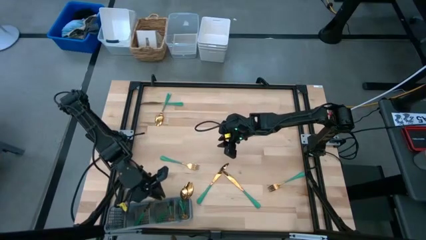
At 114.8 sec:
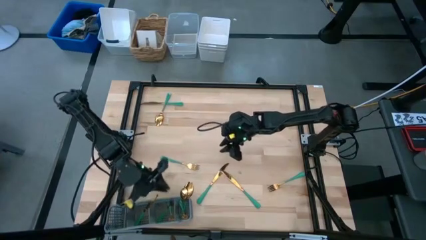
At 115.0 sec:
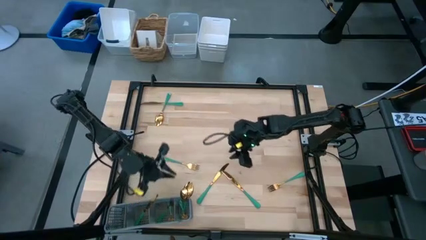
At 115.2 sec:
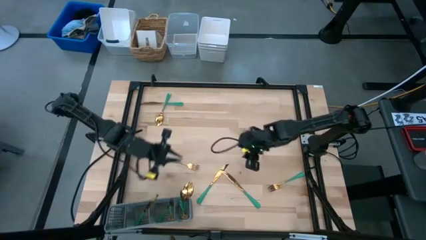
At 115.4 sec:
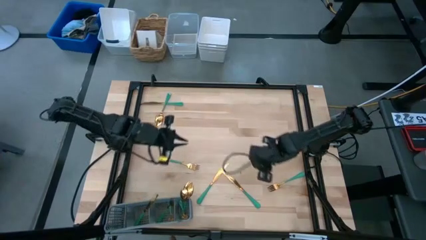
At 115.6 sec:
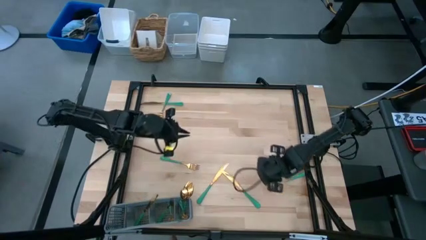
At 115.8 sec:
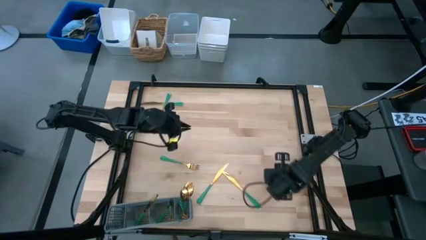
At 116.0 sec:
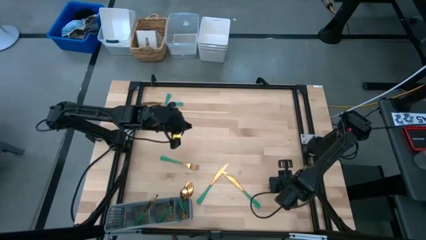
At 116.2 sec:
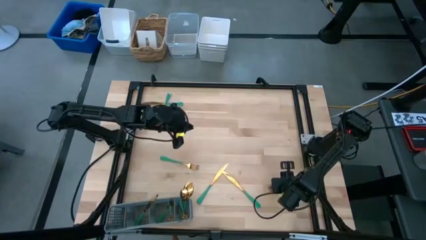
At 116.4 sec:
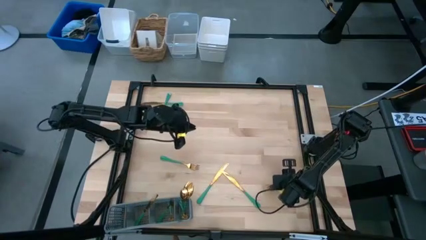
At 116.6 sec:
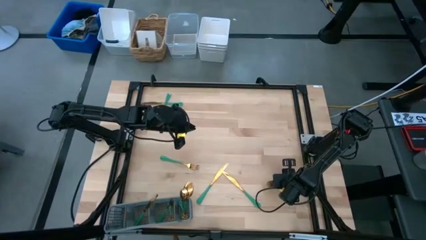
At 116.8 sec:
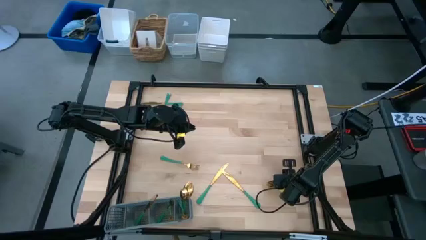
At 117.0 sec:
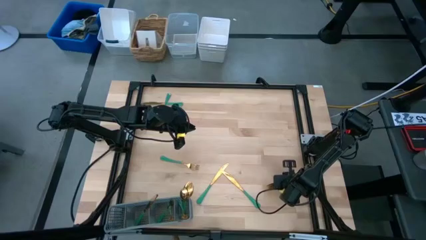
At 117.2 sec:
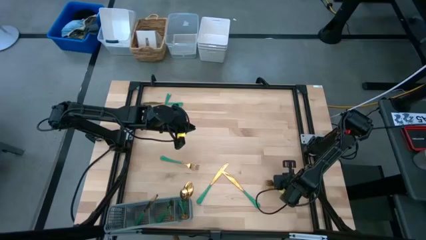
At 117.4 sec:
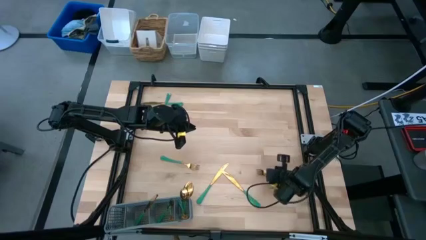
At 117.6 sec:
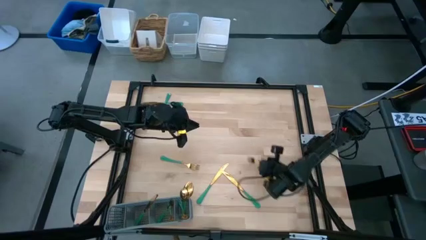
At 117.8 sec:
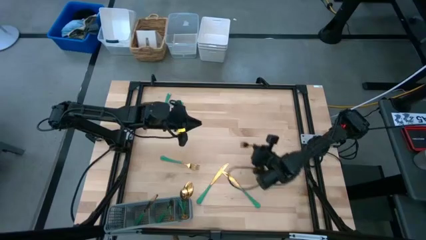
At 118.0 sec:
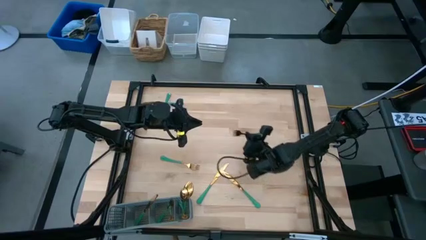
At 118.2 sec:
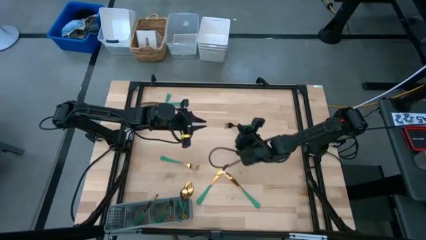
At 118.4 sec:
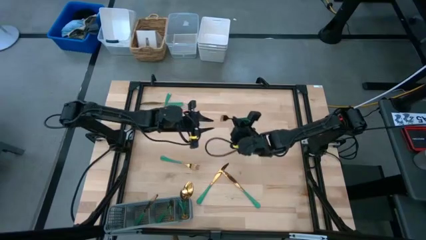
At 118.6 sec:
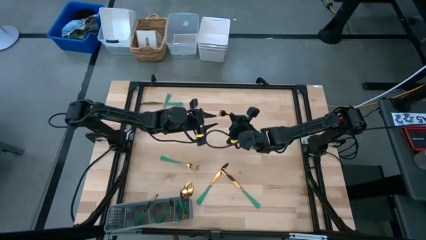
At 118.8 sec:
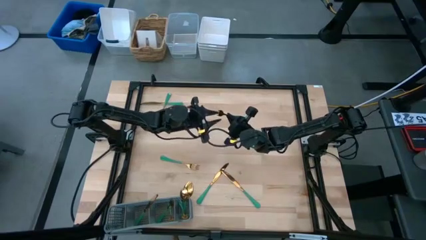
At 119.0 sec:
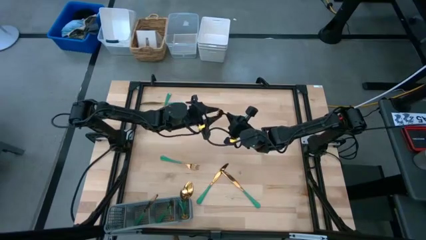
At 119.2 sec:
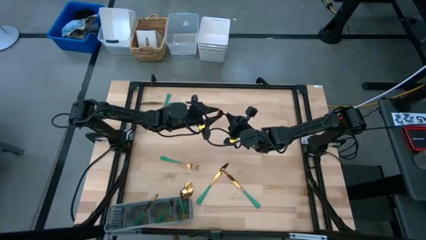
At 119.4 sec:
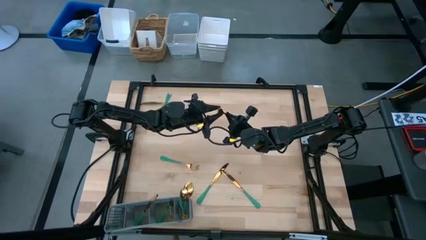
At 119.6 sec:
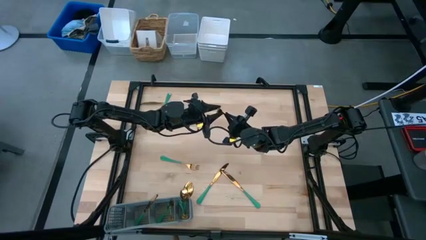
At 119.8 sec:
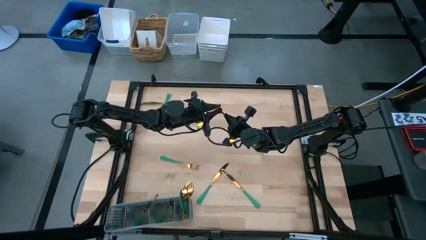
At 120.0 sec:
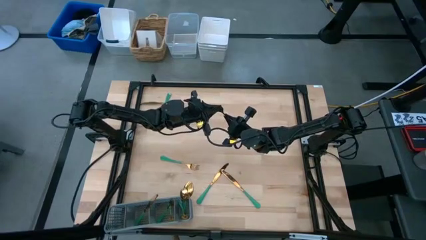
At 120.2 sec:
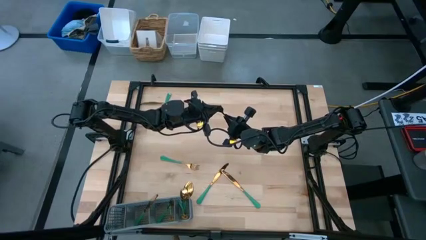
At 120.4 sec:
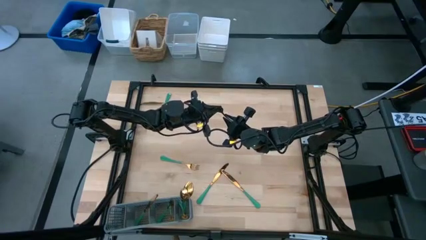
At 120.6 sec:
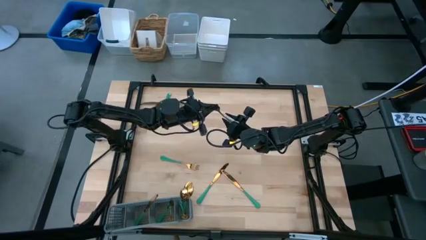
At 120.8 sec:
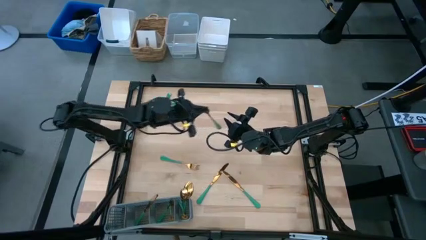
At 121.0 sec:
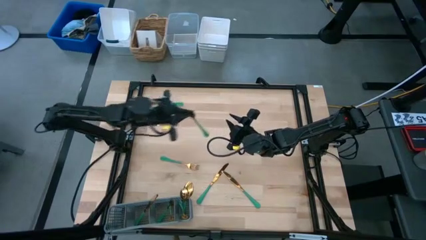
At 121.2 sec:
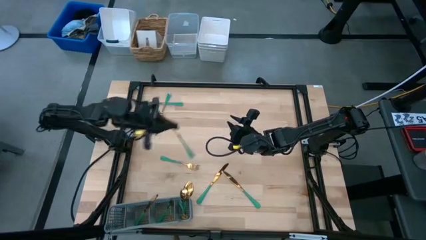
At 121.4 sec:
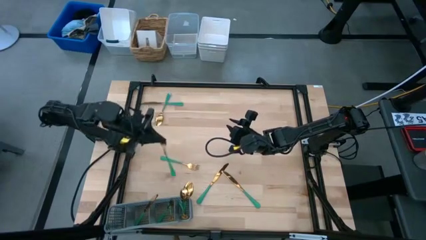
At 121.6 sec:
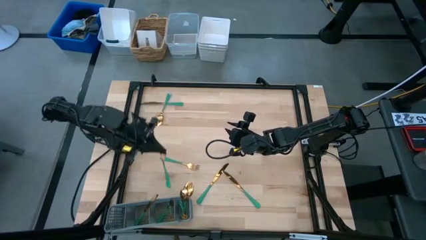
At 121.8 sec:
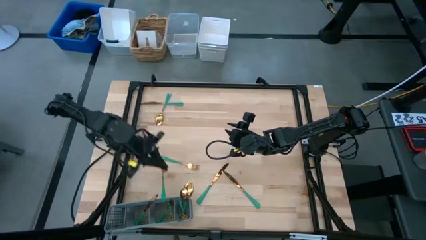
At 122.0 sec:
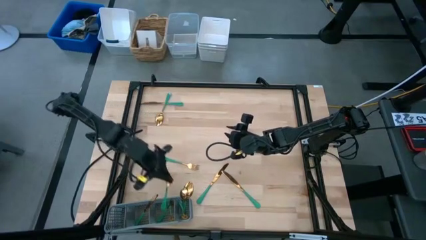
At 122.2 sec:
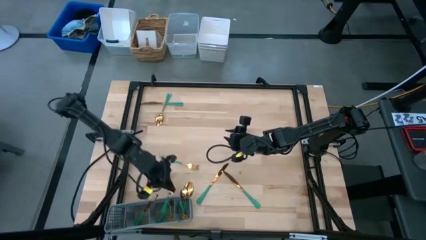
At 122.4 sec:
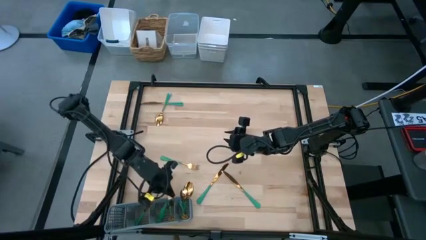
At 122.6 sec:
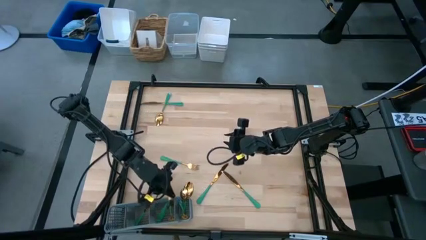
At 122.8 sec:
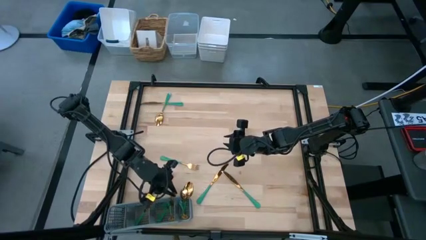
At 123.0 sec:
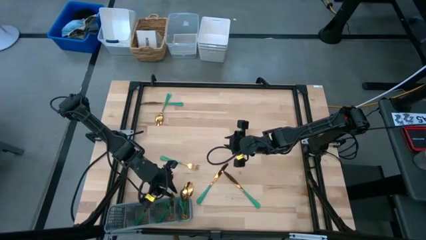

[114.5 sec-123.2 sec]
Task: Sort silverware
Put the right fork into the cutlery rack

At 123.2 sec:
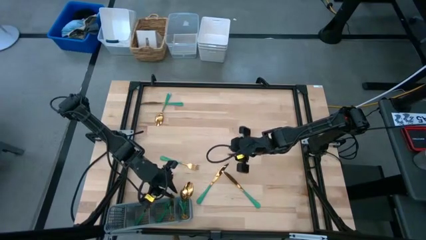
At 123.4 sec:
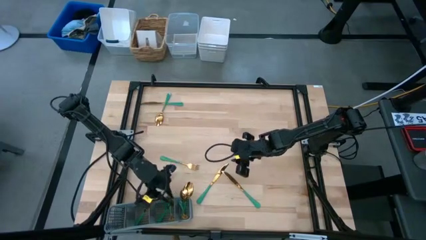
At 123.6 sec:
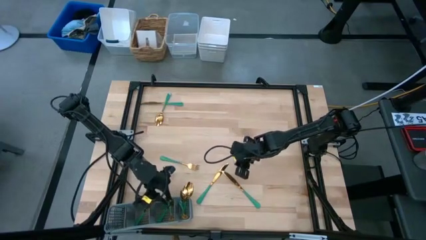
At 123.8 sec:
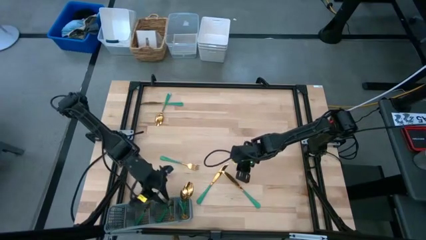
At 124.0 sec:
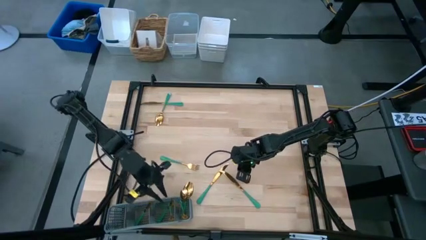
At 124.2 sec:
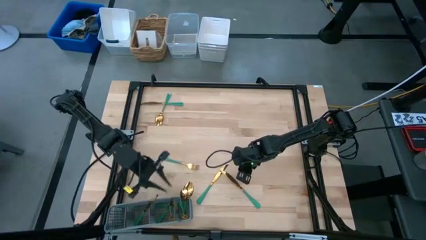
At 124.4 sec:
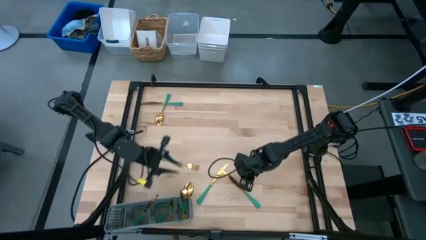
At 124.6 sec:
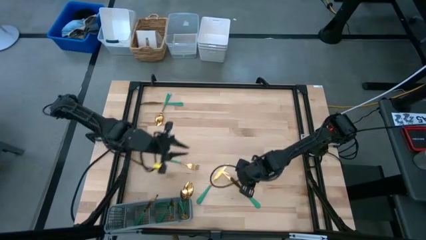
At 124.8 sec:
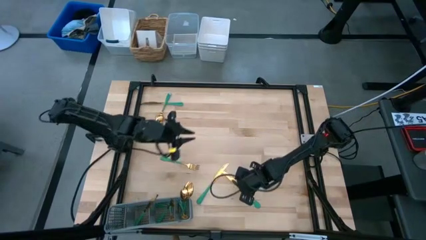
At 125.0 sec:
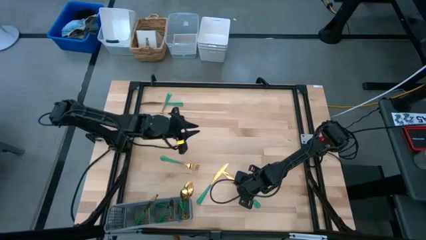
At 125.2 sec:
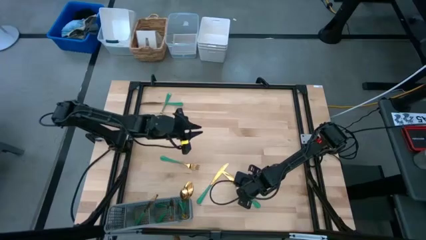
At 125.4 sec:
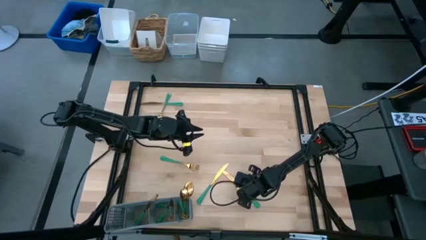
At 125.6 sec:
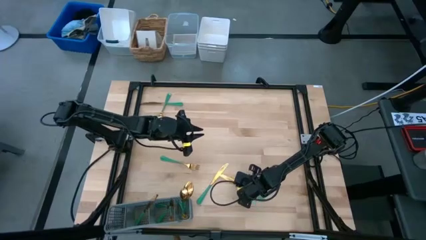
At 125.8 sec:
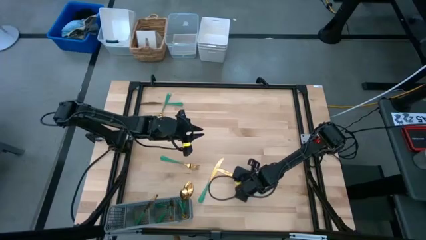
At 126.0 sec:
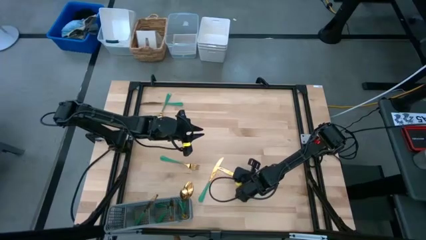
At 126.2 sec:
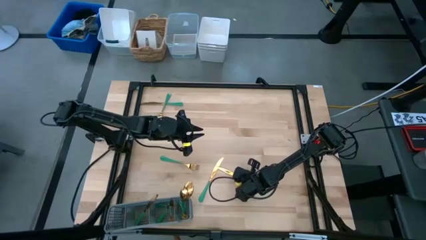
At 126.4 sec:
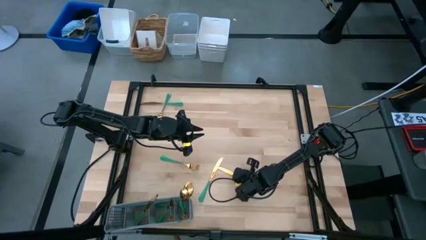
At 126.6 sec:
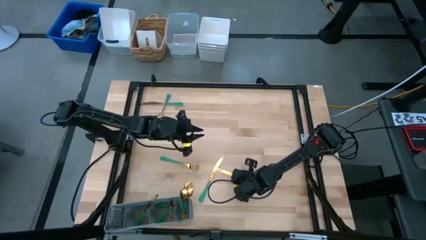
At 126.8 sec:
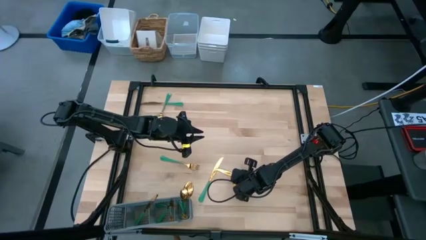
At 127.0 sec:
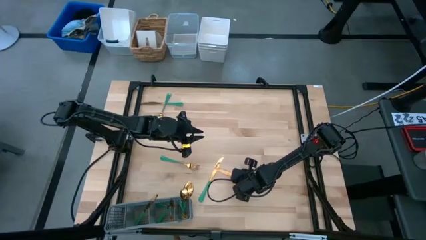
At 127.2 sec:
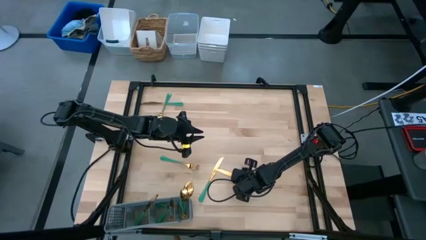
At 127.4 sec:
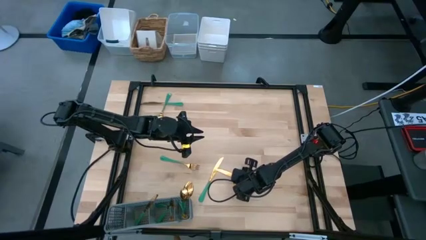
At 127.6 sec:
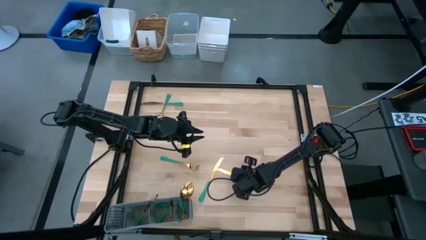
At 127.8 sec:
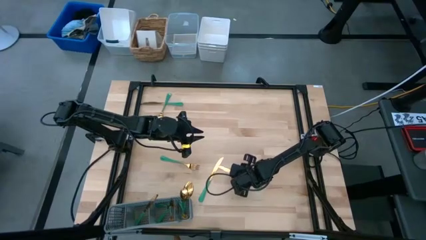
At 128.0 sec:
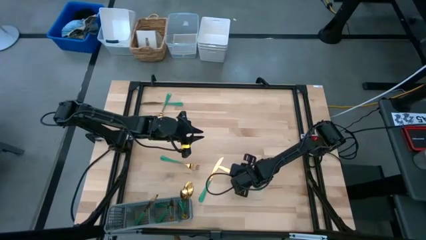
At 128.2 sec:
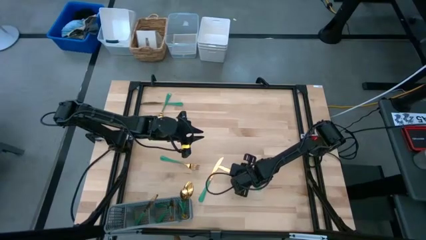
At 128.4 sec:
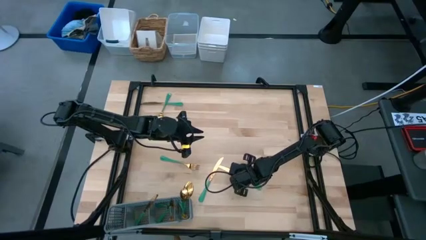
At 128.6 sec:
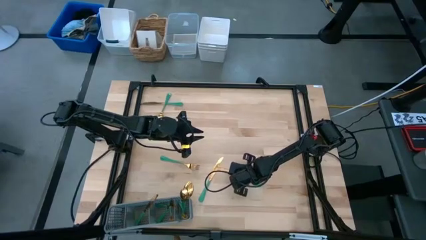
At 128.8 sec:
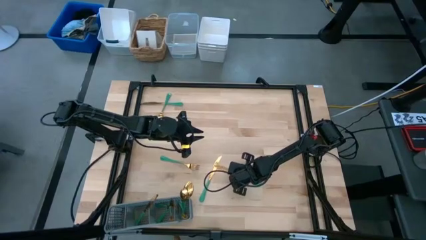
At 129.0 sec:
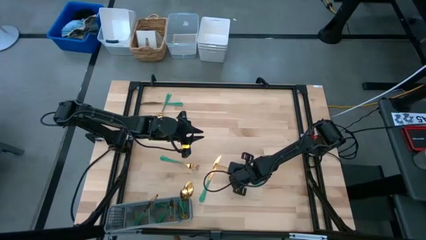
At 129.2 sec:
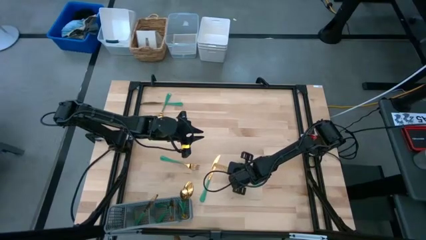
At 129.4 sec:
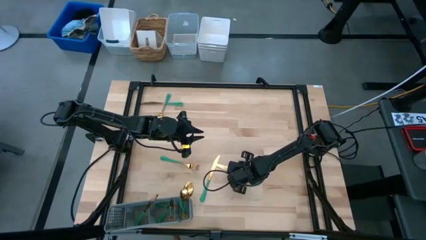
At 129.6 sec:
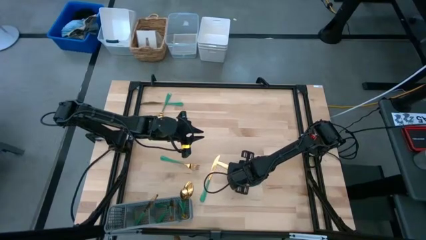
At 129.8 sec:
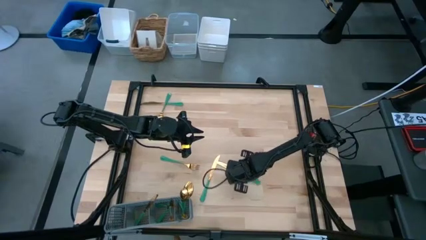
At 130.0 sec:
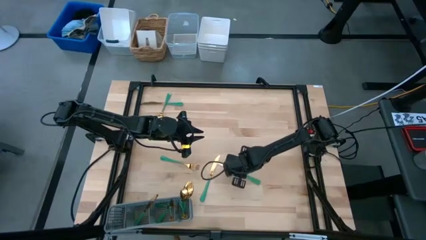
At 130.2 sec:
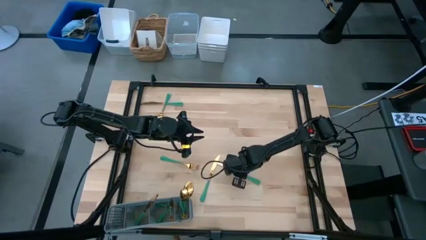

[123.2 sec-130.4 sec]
Put the right knife into the cutlery rack
